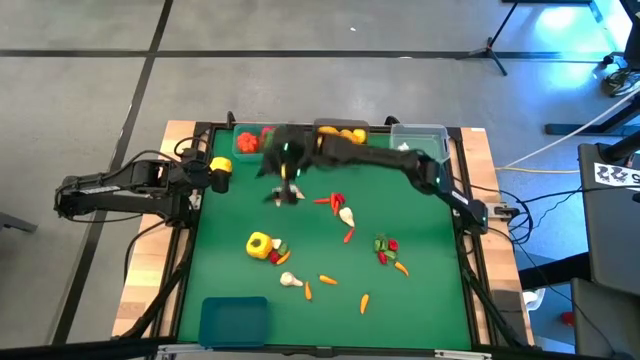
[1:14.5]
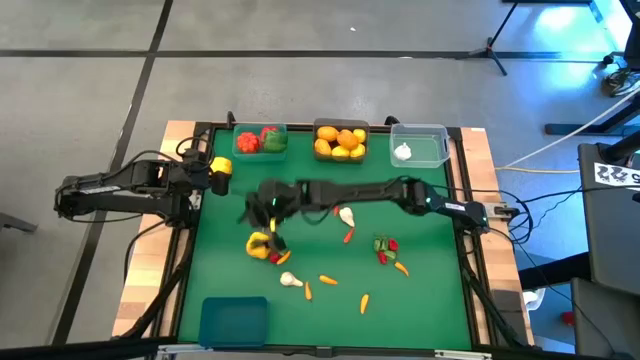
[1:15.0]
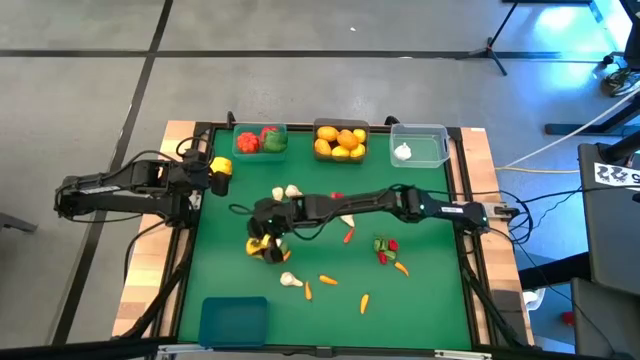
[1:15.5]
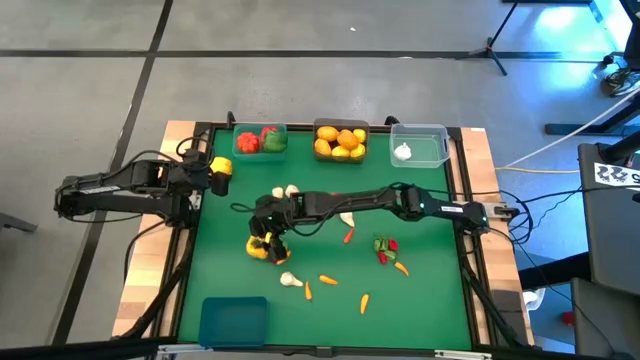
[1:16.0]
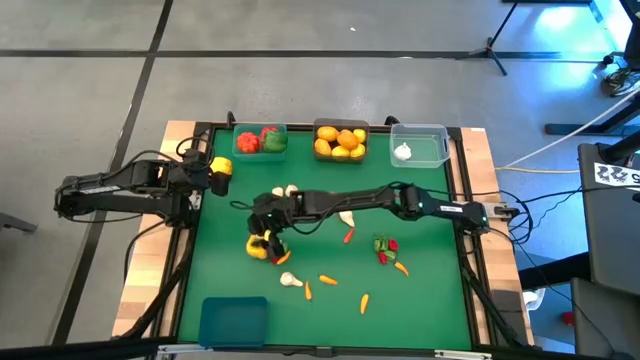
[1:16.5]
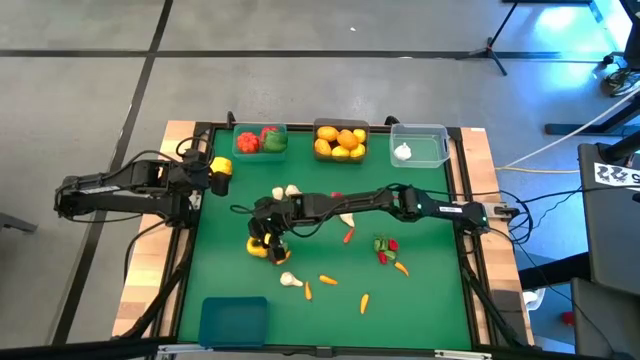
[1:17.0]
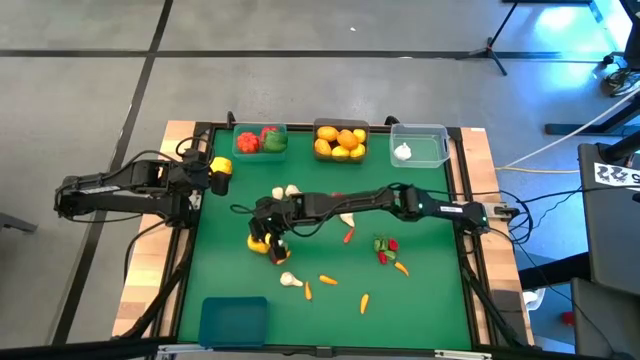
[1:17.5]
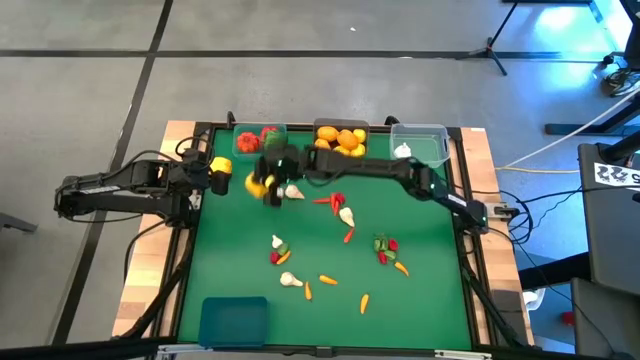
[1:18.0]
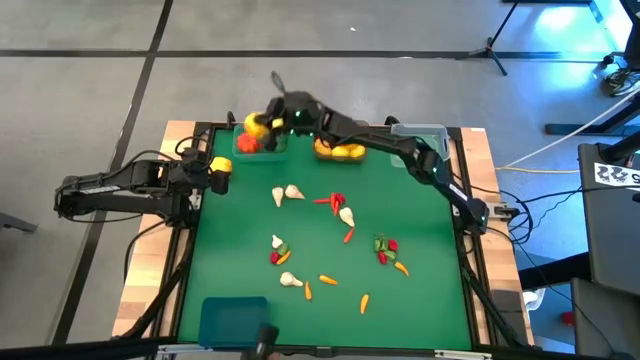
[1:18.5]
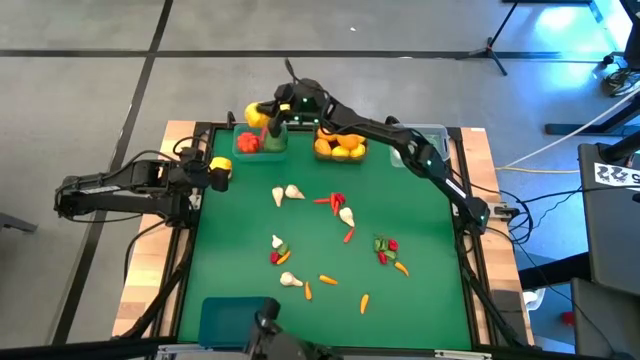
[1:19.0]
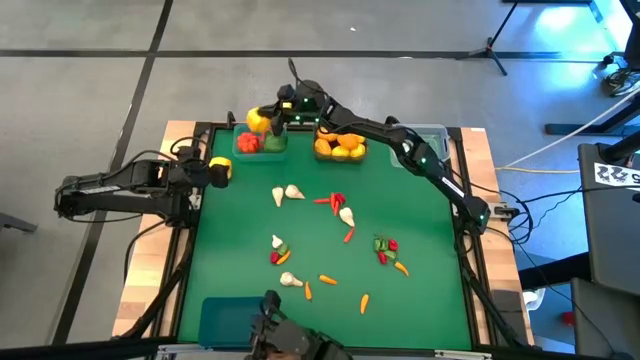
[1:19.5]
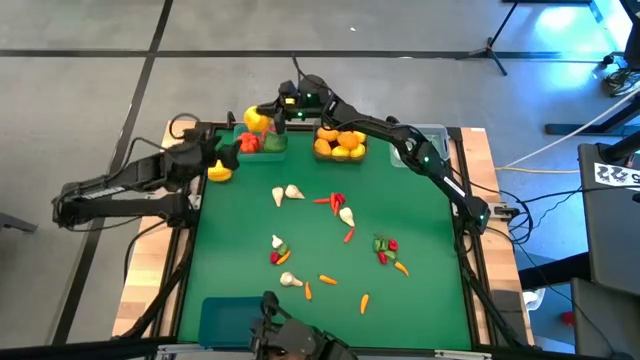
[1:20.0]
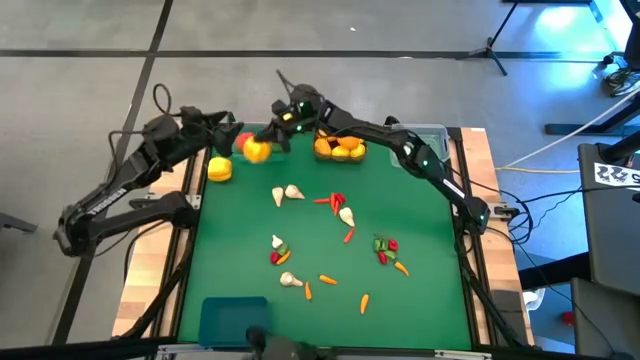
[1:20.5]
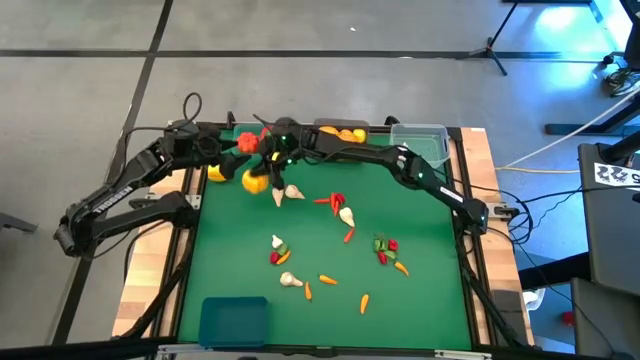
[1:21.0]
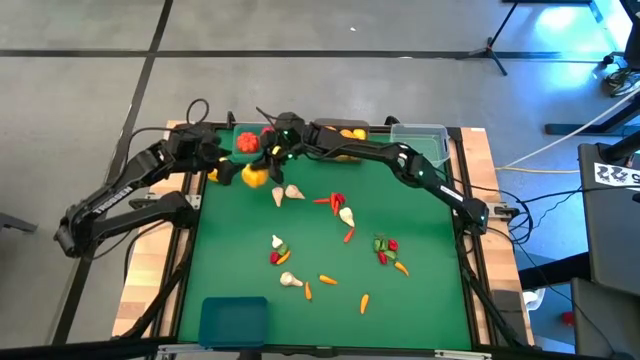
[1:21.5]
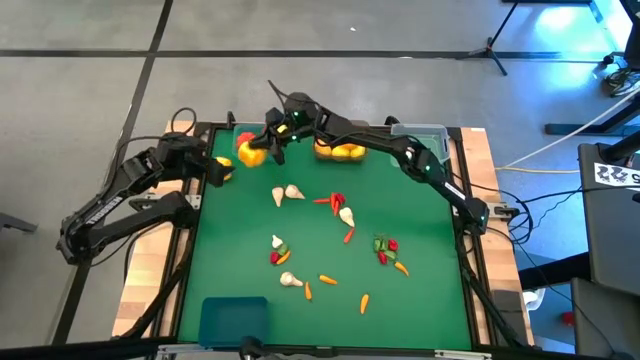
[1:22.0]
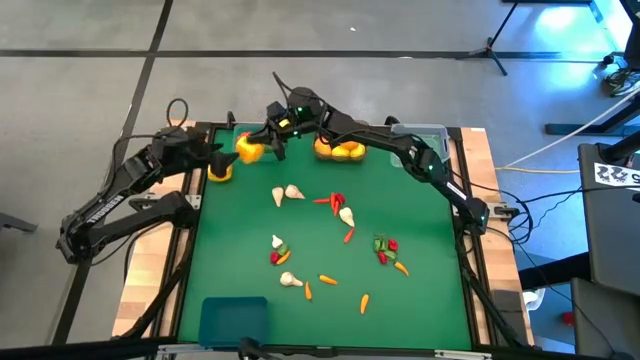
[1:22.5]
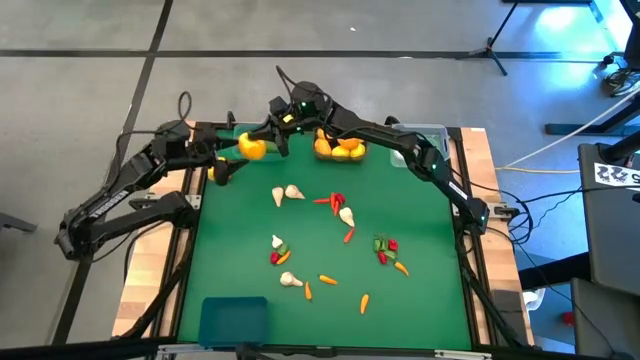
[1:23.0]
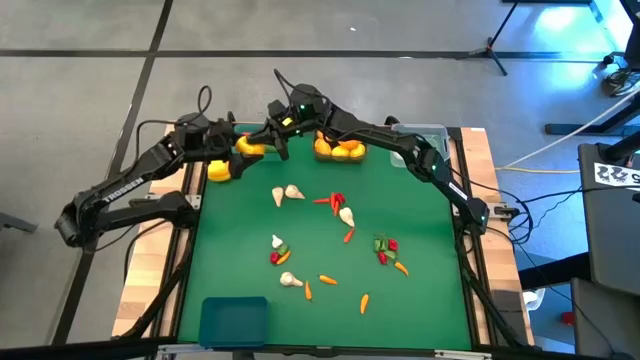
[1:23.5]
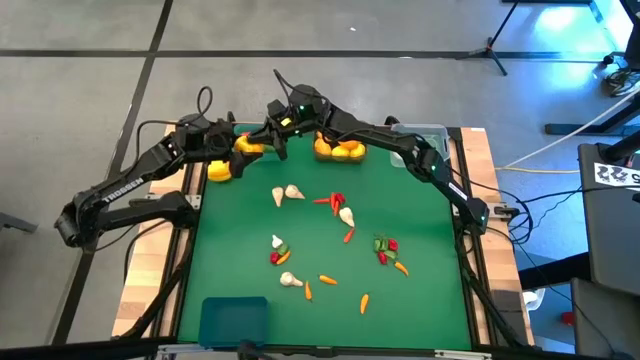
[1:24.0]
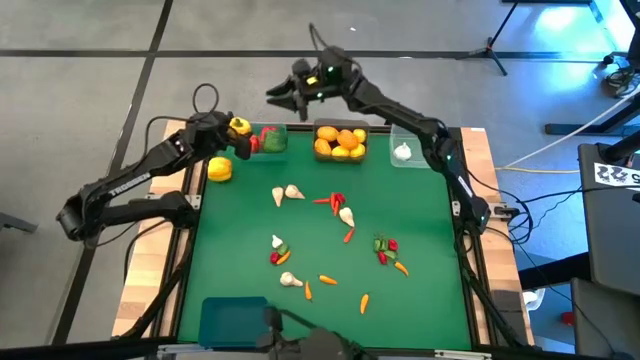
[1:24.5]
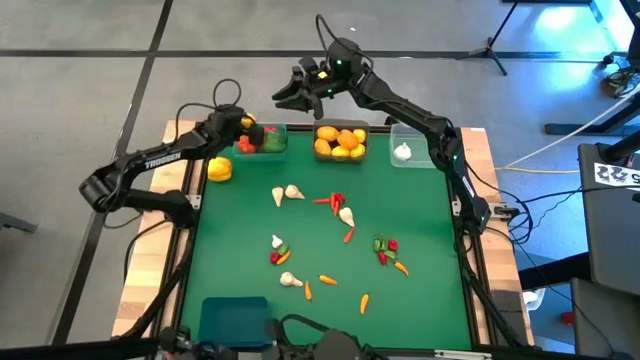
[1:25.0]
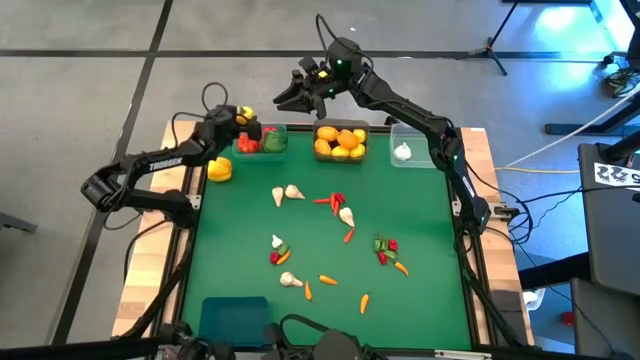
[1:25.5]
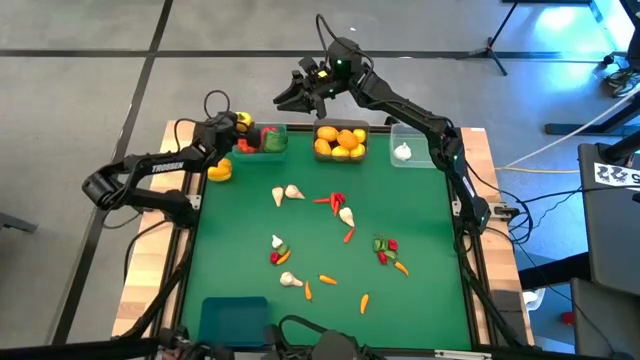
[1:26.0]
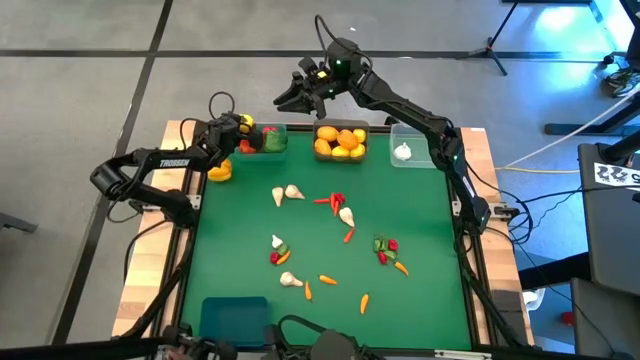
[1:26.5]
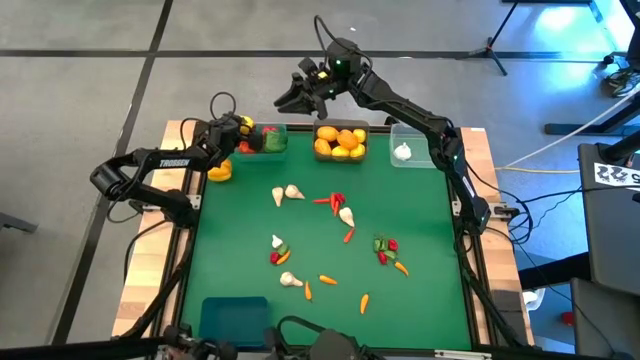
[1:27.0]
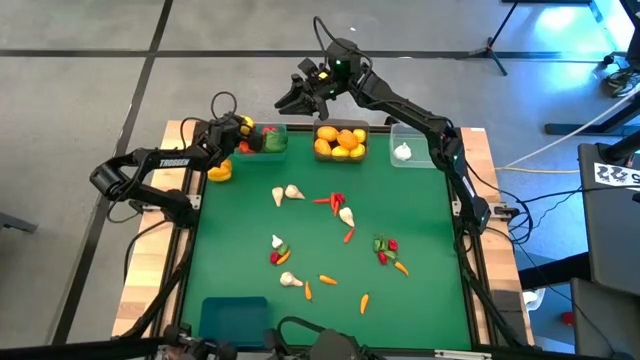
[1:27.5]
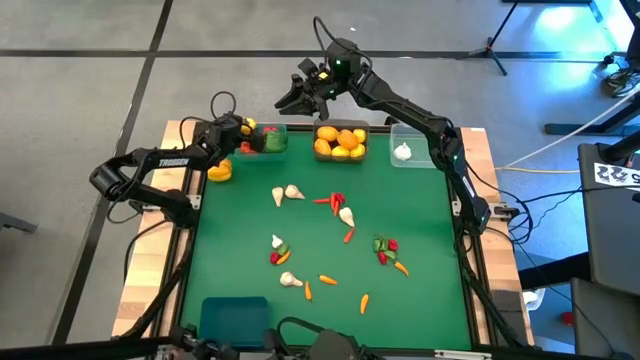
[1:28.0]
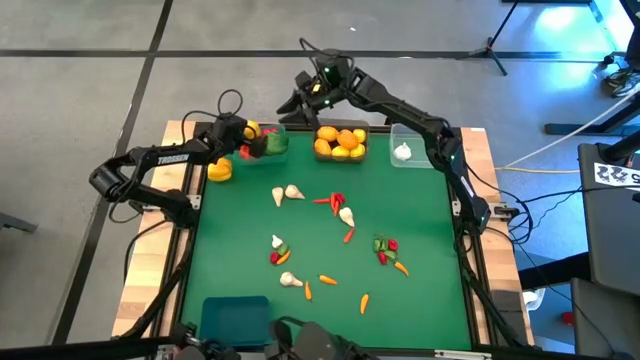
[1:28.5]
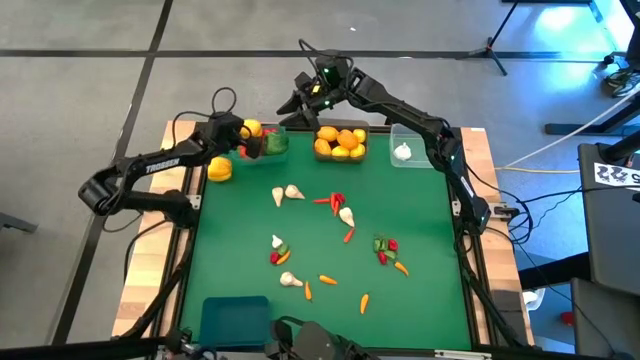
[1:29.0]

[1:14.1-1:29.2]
Task: Sort produce into baskets
Put the yellow bell pepper into the light blue bin

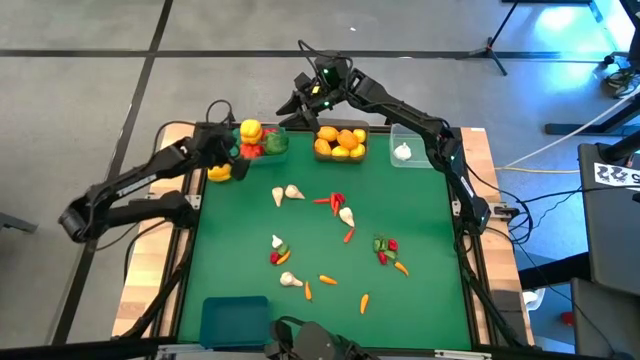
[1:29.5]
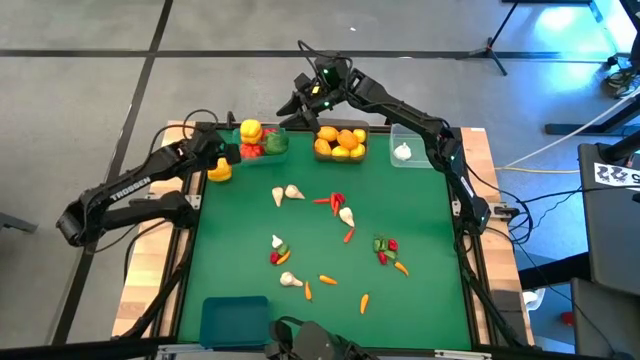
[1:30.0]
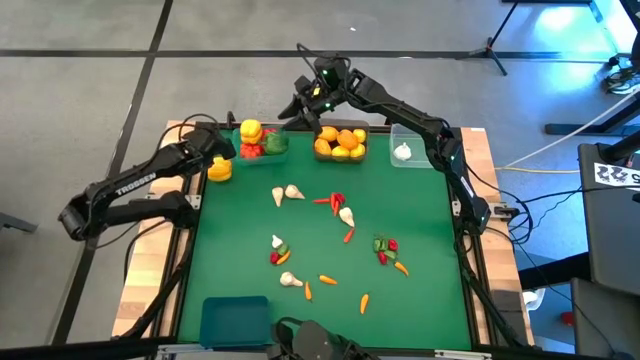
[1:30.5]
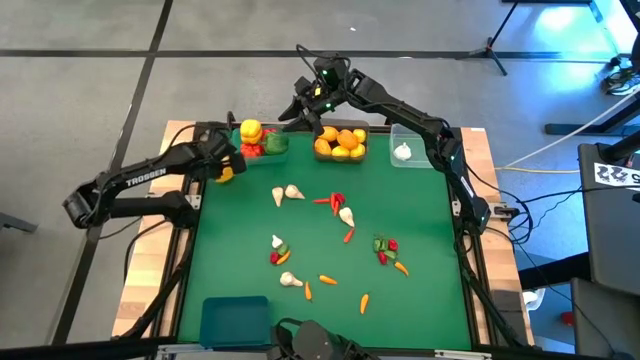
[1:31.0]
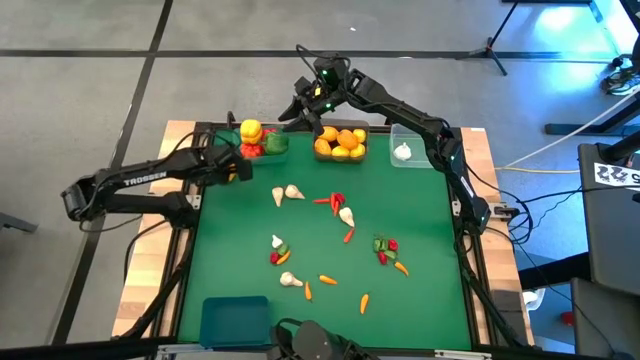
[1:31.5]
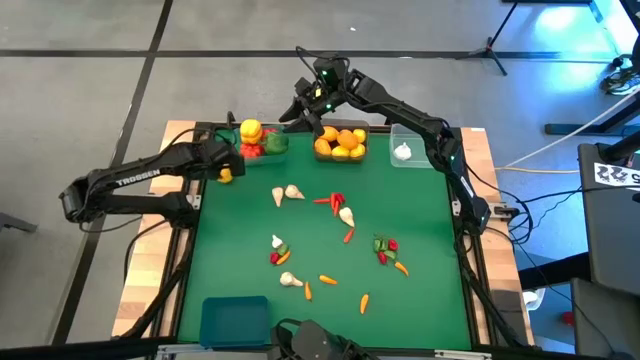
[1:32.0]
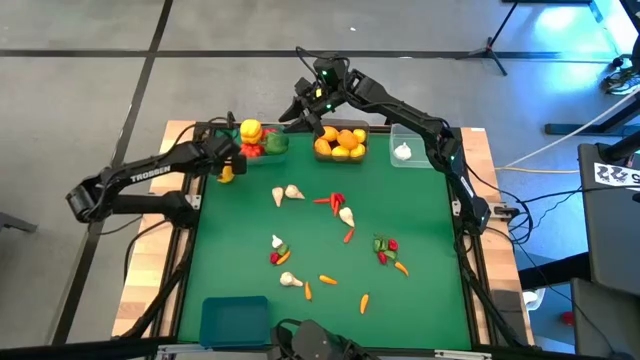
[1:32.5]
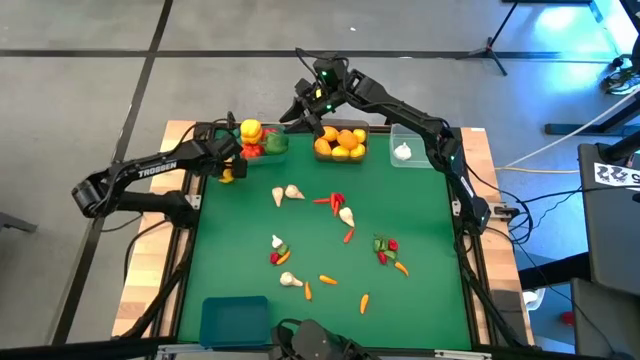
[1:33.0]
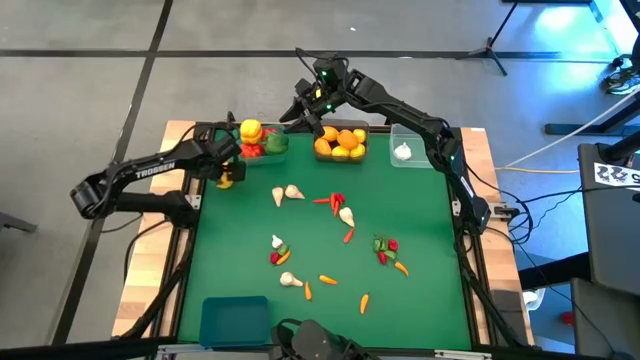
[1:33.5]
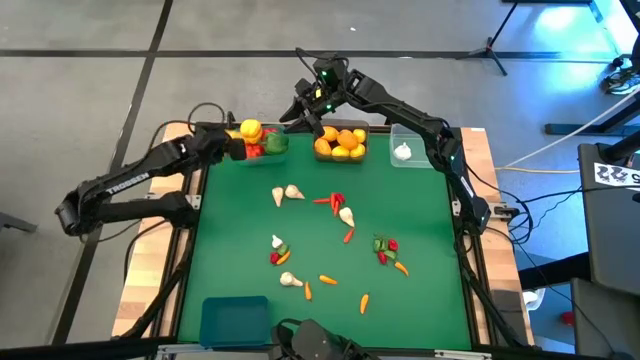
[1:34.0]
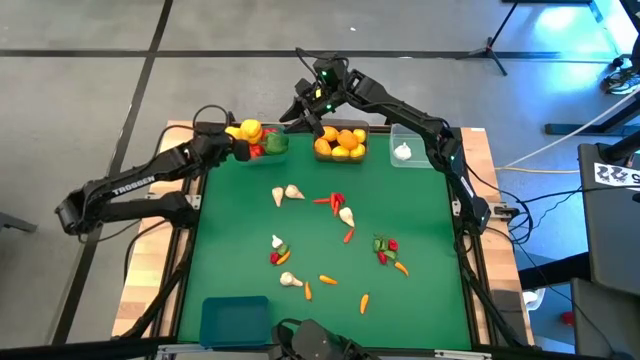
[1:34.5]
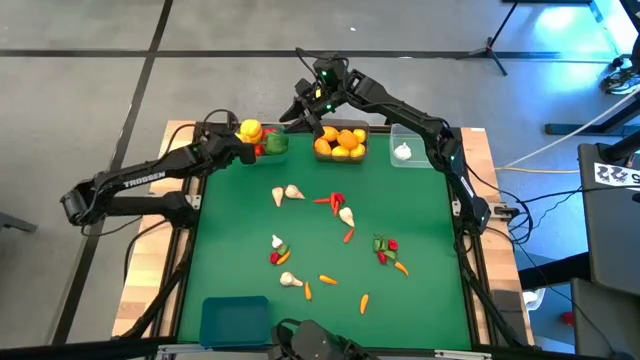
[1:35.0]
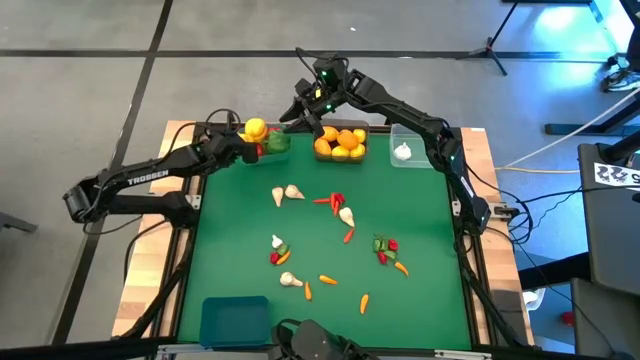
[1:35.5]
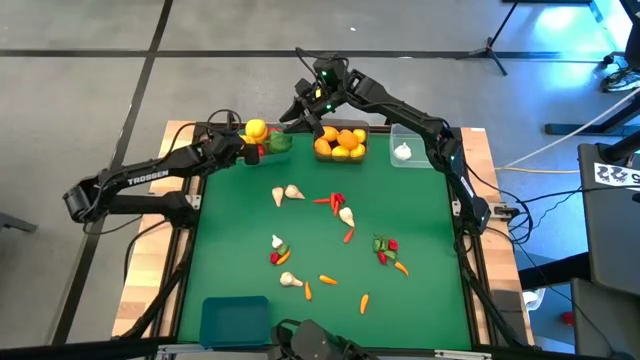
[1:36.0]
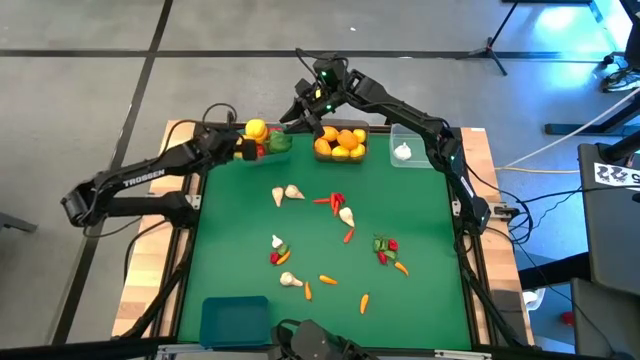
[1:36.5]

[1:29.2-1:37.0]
Put the yellow bell pepper into the light blue bin
